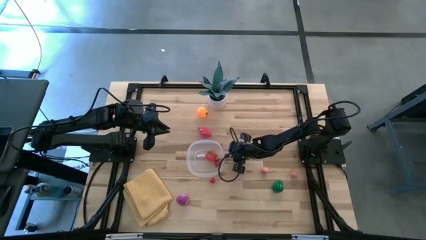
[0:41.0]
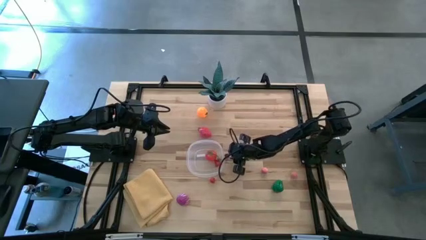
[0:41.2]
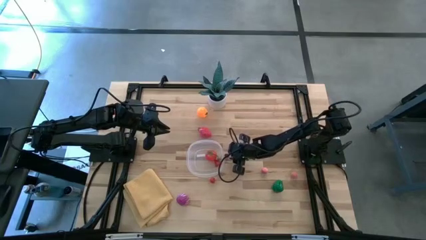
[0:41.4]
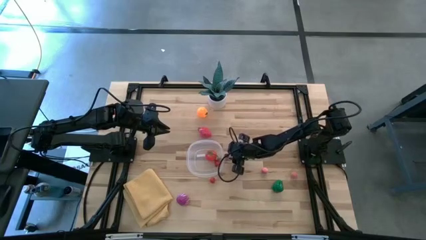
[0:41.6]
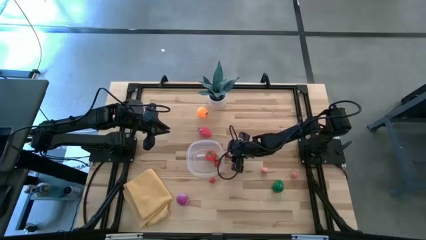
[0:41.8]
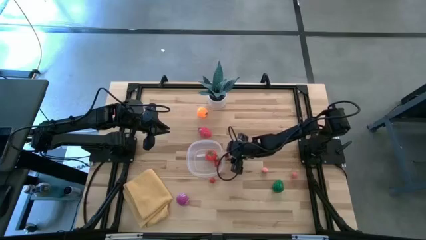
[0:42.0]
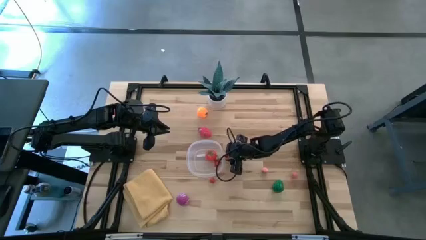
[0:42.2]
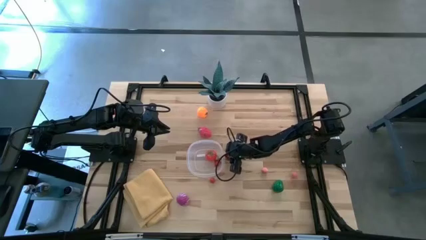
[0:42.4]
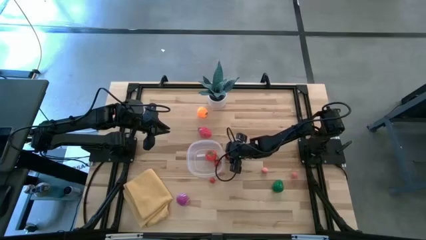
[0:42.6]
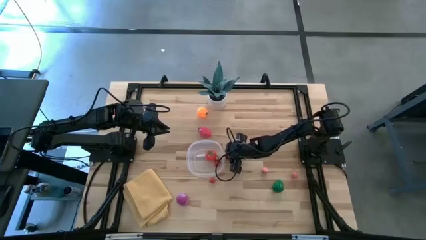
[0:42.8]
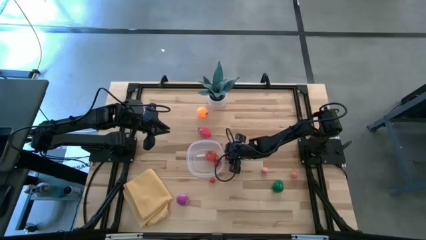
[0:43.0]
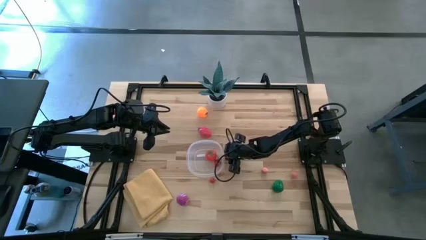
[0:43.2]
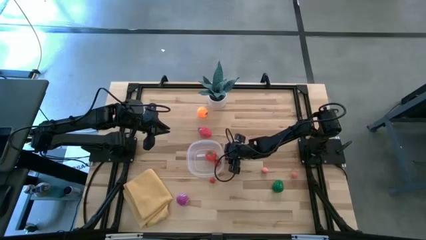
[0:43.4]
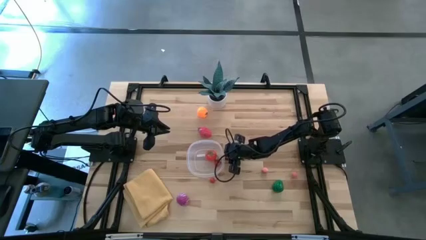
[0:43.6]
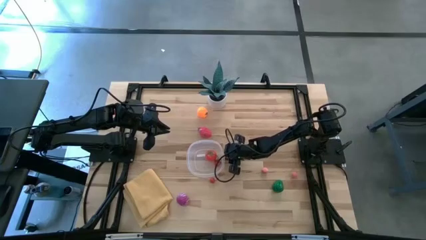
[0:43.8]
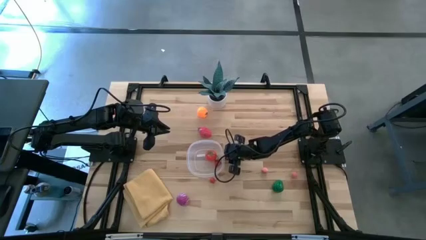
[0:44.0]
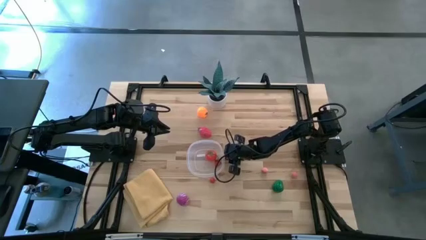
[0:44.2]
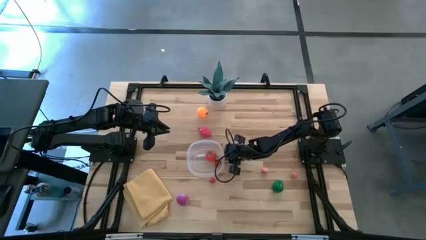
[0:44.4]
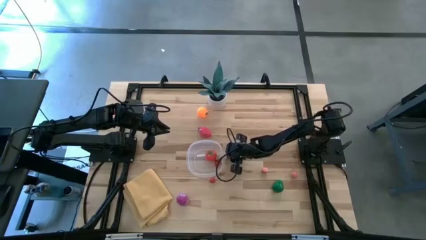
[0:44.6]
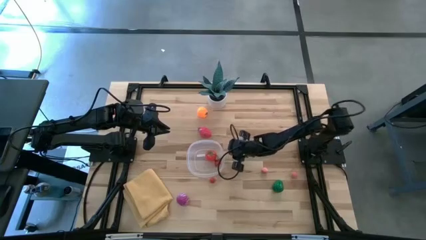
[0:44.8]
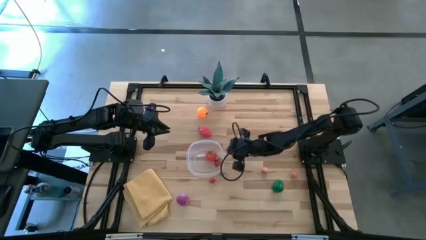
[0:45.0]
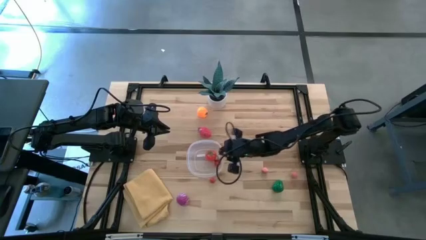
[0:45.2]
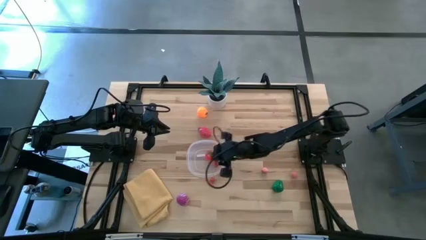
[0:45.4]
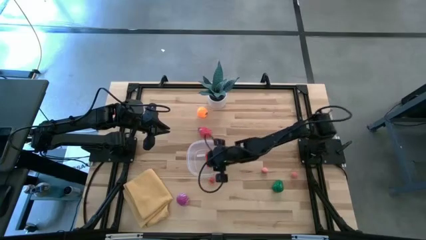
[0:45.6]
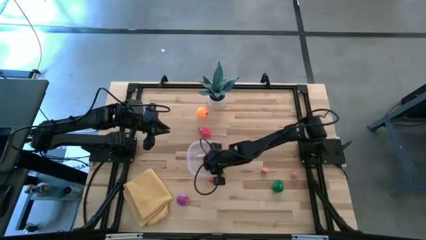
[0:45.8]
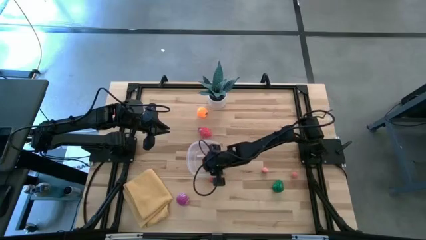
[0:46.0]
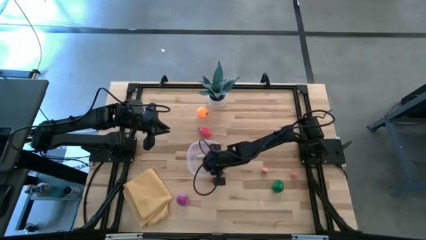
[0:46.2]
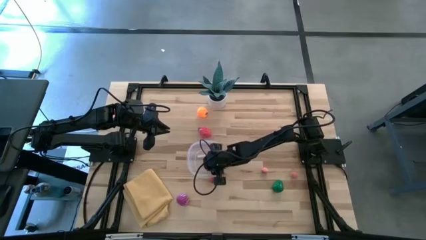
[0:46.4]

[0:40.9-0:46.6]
Task: Pick and placing Produce into tupperware
Put the dark red cherry into the transparent bin

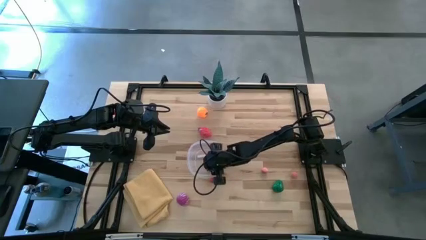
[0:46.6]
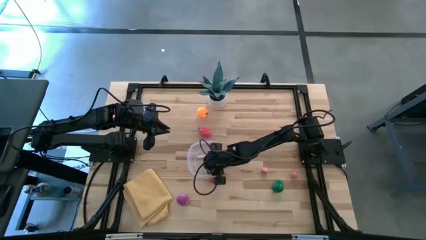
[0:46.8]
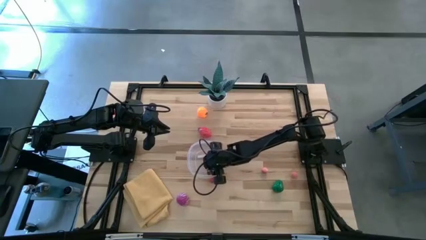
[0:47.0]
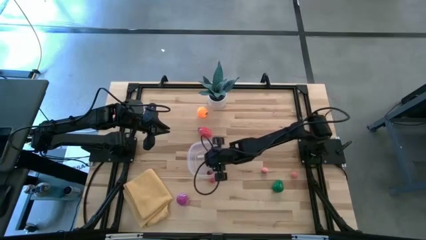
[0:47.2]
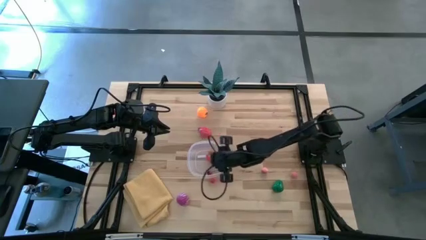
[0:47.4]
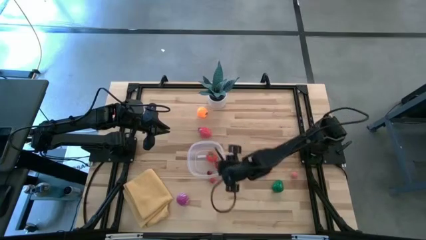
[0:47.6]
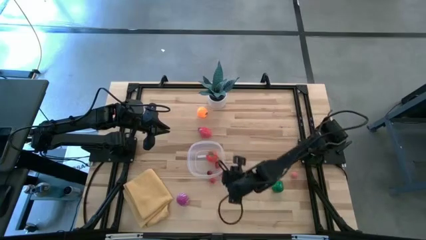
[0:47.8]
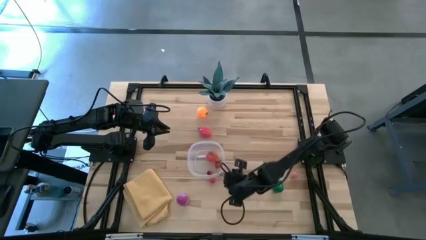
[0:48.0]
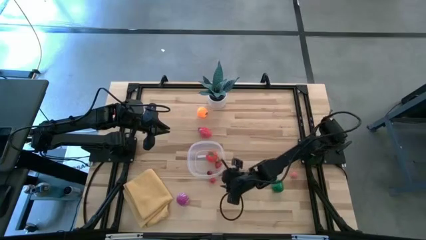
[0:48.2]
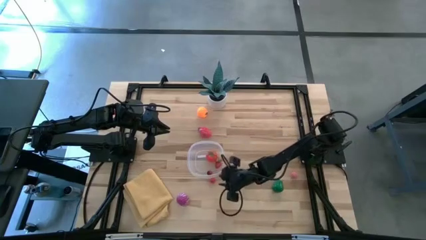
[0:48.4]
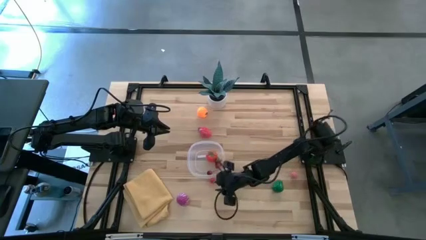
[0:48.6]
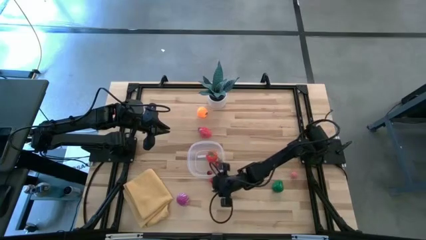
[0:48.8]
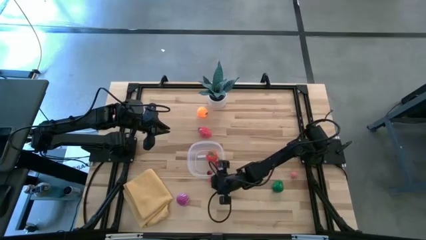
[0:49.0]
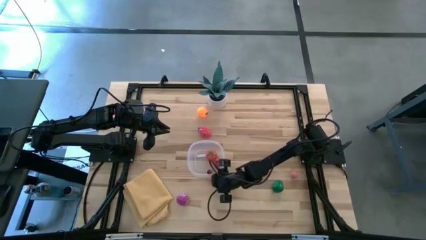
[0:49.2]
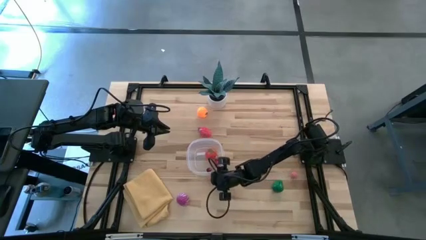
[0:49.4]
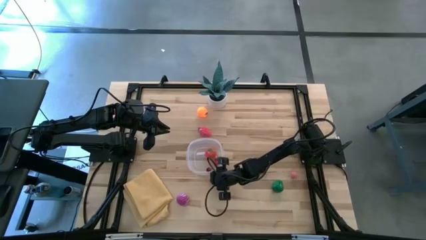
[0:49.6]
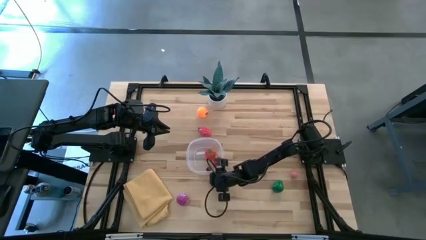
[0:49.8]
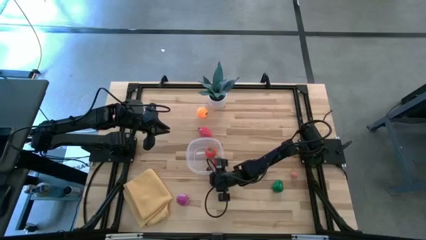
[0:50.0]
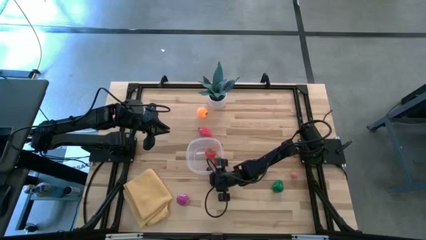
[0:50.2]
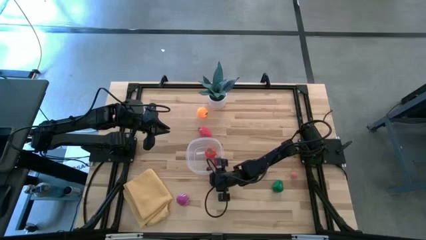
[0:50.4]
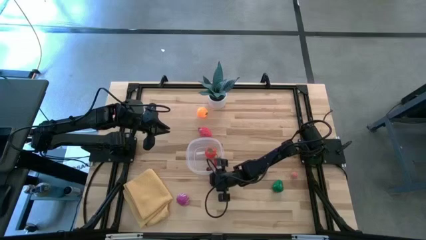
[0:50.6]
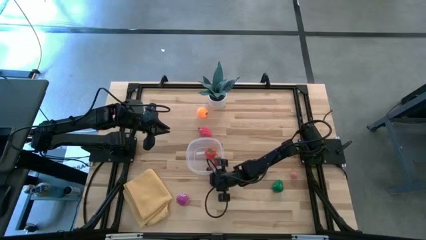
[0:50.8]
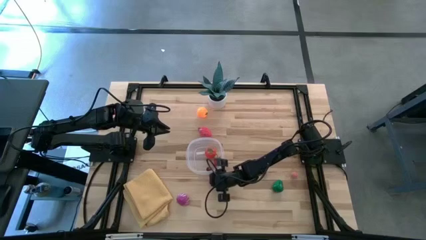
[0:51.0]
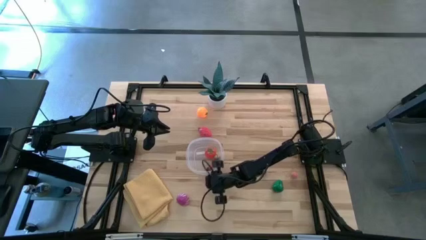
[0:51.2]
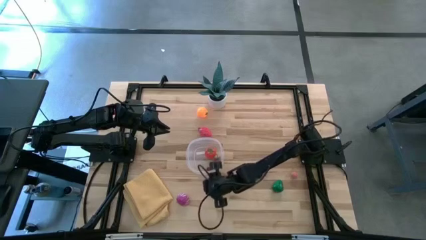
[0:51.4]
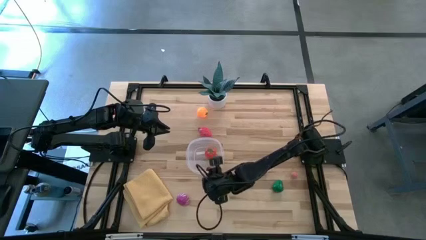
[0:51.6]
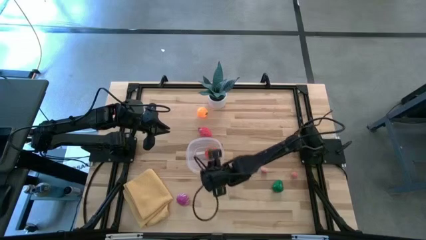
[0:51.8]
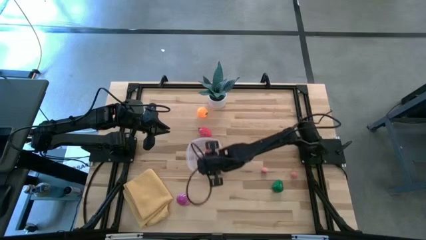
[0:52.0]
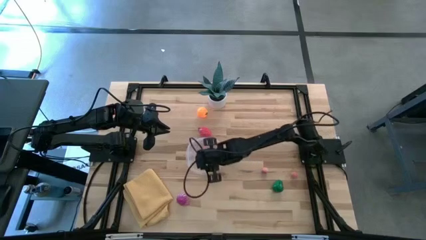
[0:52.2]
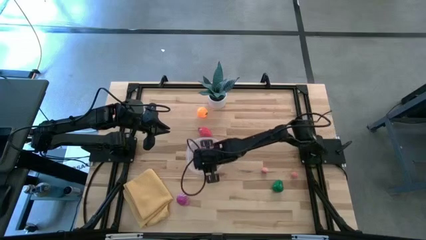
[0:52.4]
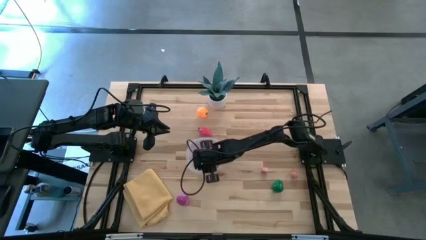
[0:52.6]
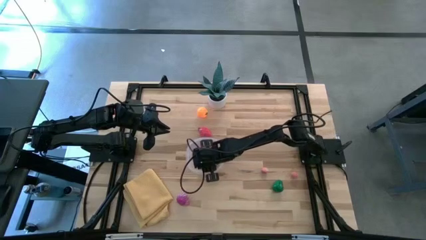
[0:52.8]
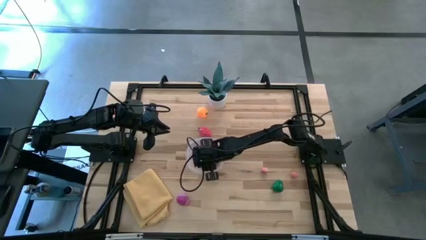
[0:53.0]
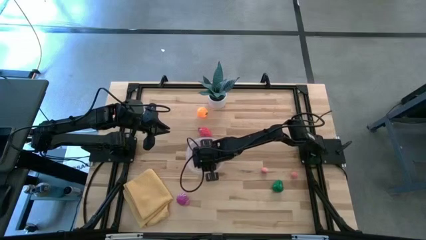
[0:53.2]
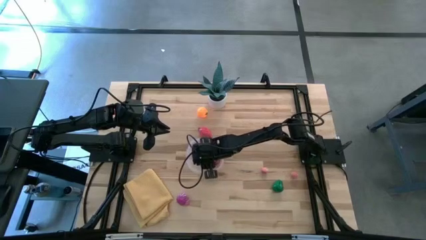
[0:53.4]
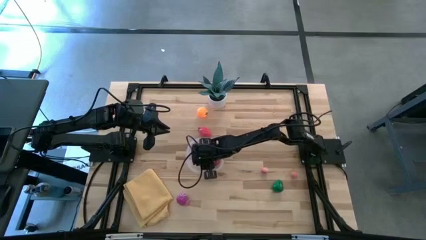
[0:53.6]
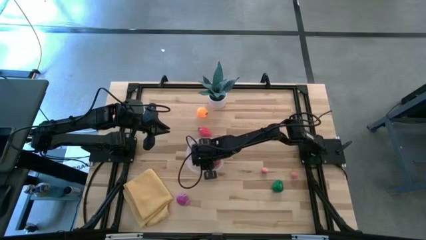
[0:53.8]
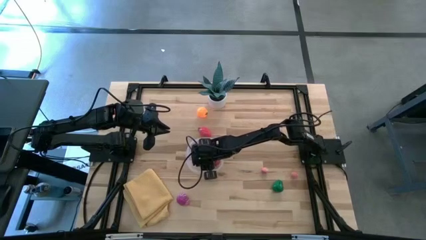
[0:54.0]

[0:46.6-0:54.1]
Put the red cherry into the transparent bin

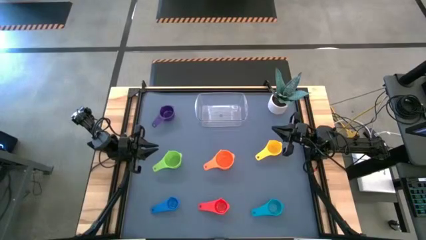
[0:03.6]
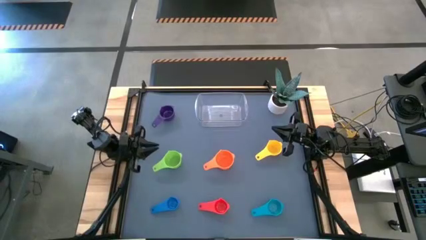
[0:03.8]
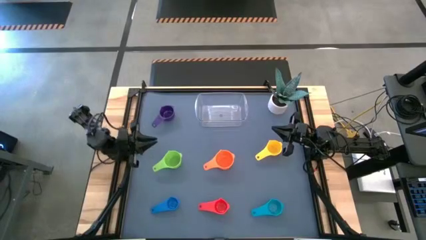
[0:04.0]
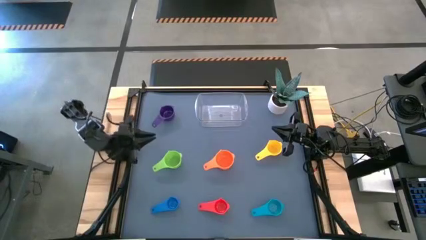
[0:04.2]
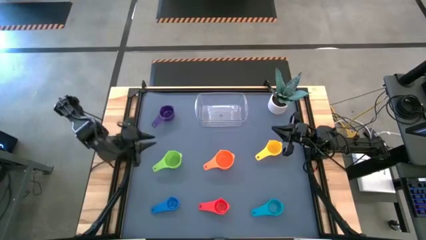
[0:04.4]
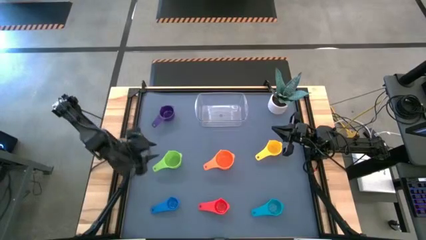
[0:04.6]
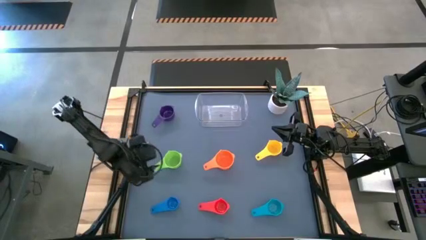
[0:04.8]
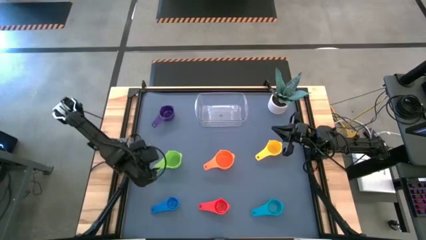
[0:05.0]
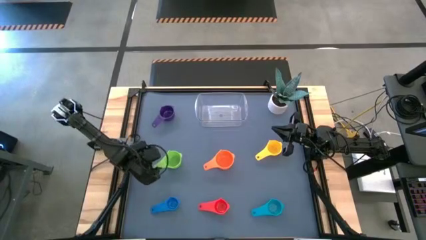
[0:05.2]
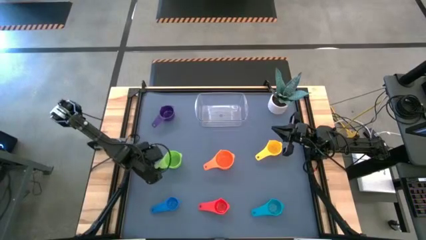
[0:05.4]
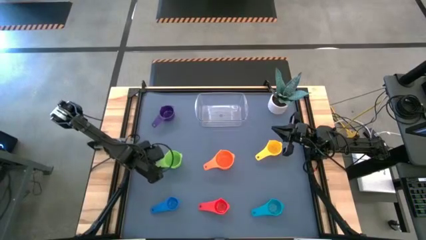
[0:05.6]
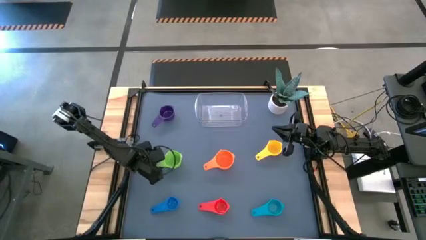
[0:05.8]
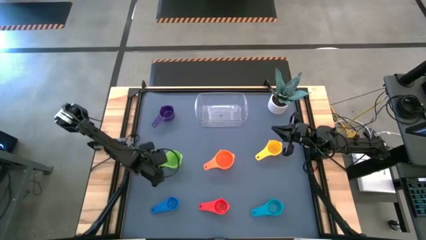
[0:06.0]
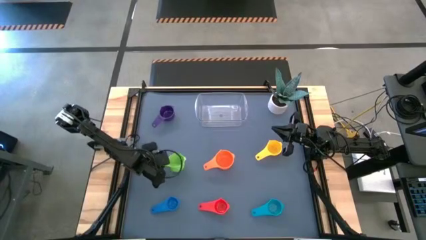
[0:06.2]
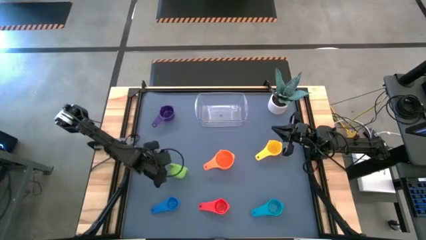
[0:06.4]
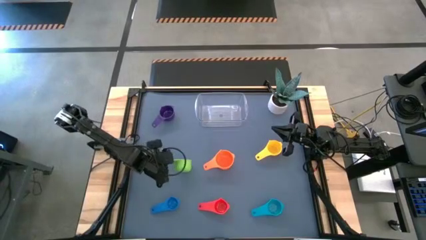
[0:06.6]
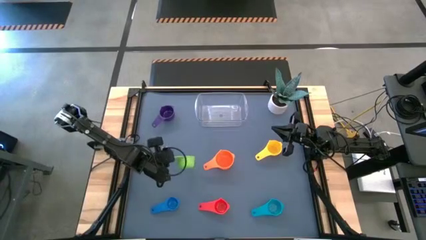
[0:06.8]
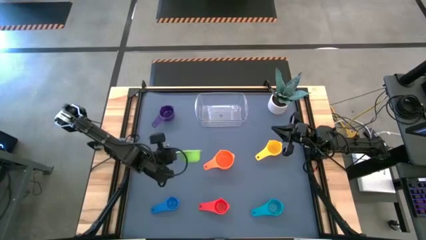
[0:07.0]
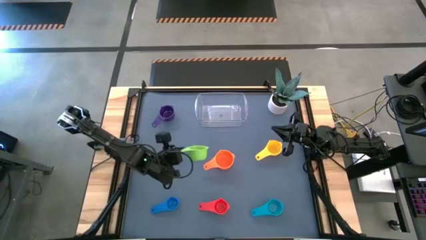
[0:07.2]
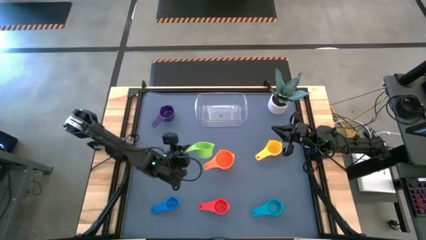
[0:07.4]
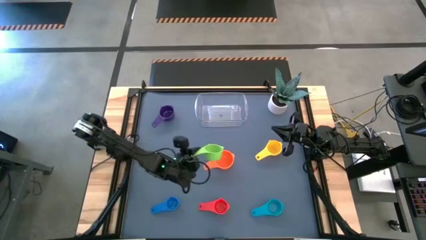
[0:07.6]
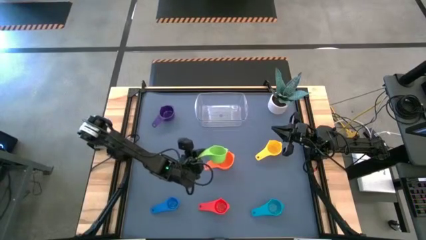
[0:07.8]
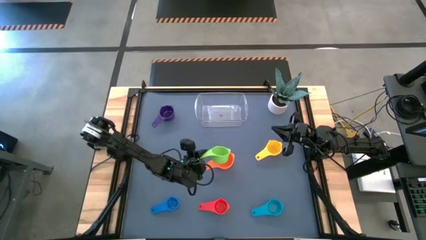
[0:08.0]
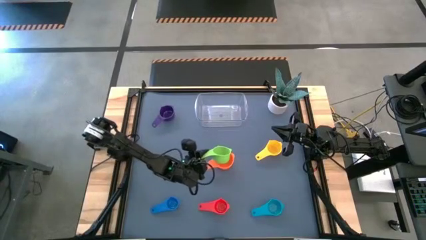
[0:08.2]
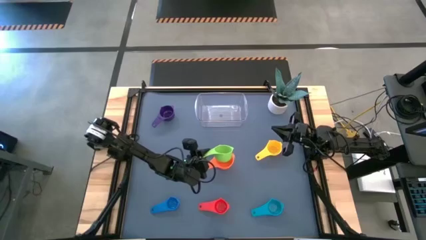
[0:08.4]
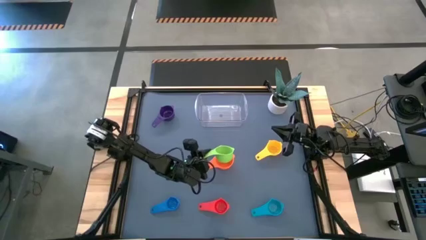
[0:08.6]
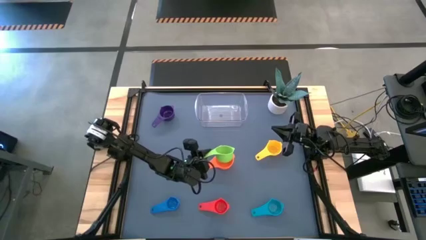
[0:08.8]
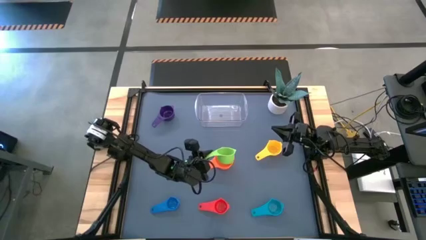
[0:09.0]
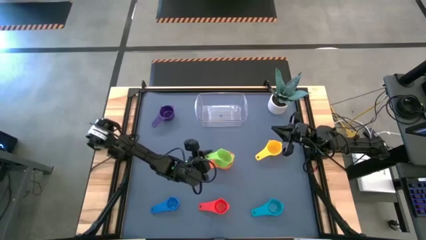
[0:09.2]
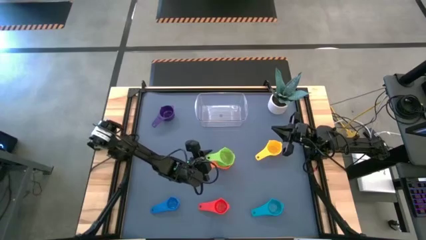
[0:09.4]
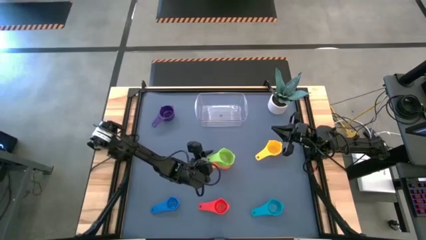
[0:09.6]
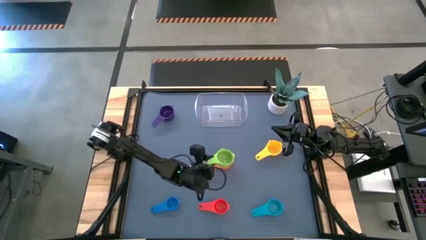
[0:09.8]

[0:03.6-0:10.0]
Task: Nest measuring cups in basket
Stack the green measuring cup on top of the orange measuring cup
